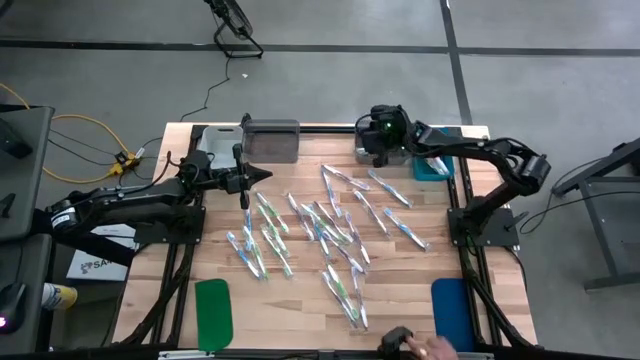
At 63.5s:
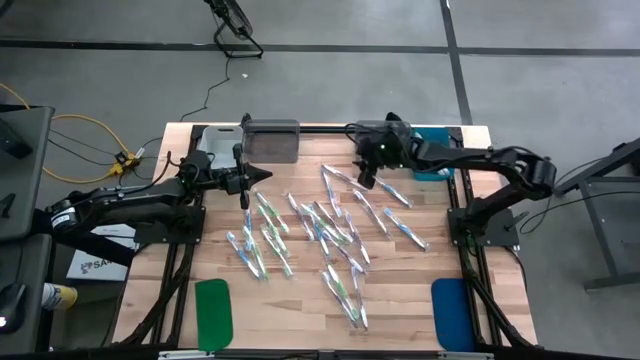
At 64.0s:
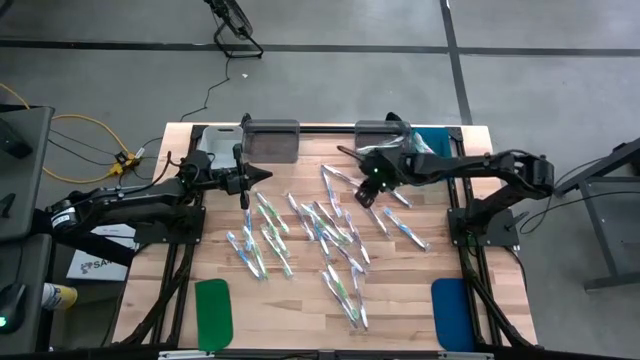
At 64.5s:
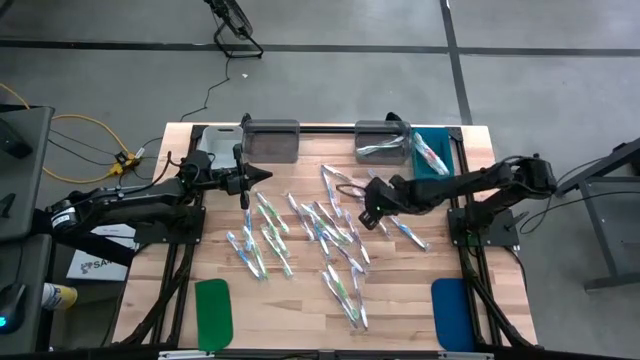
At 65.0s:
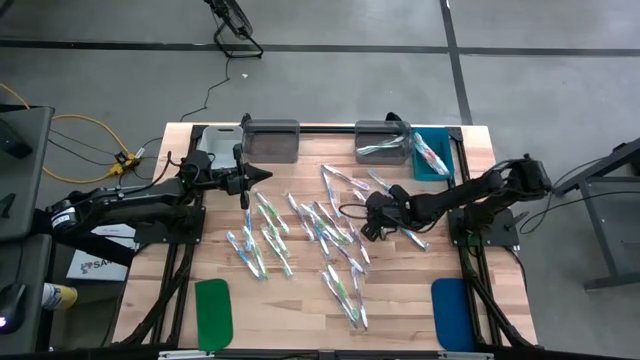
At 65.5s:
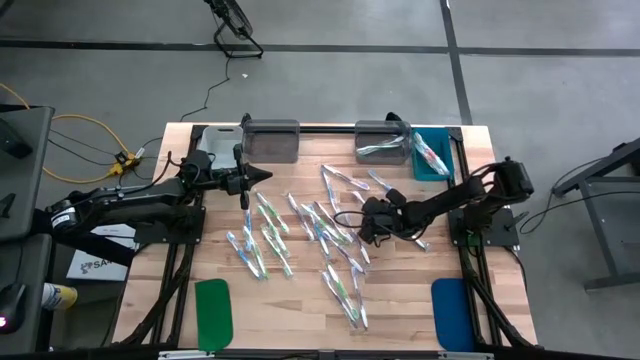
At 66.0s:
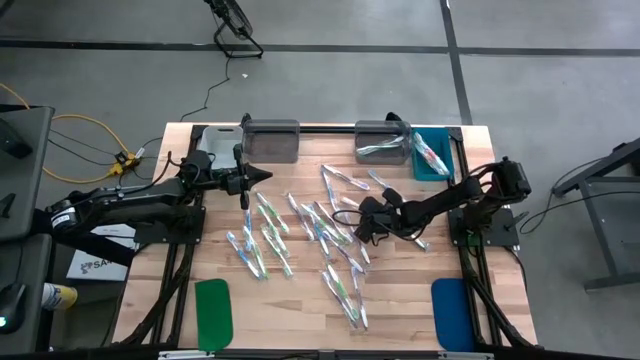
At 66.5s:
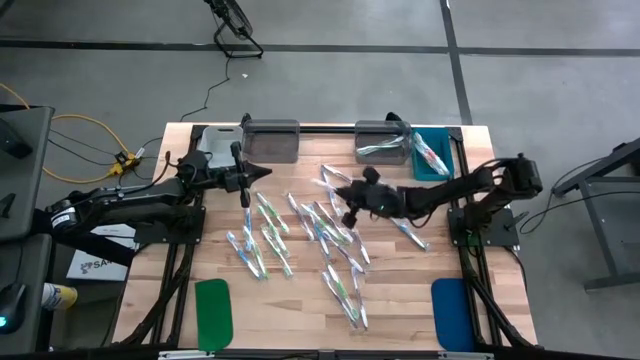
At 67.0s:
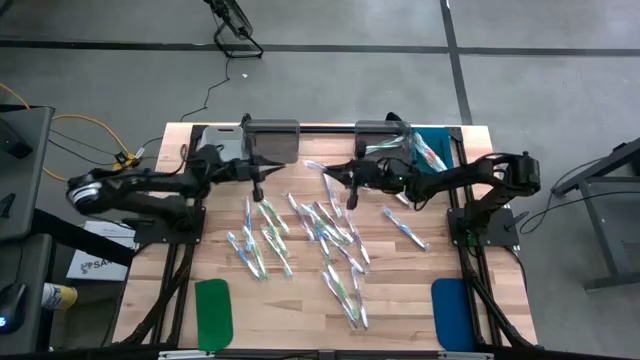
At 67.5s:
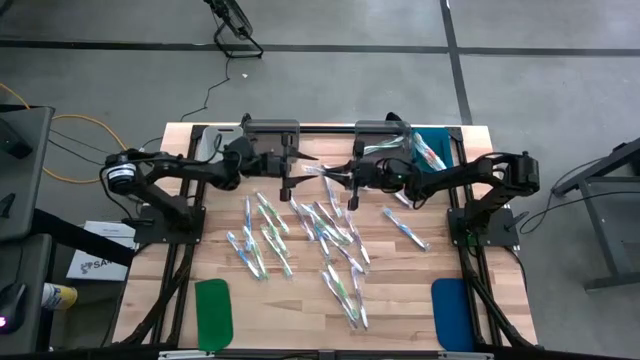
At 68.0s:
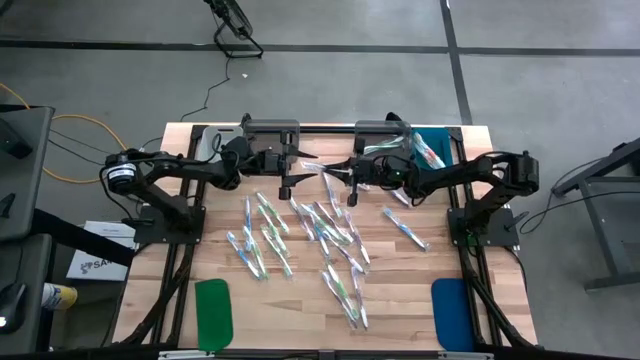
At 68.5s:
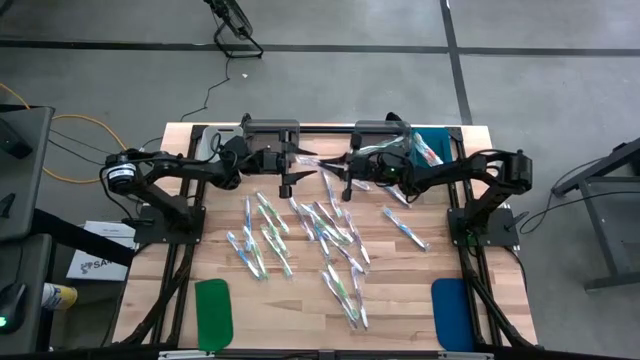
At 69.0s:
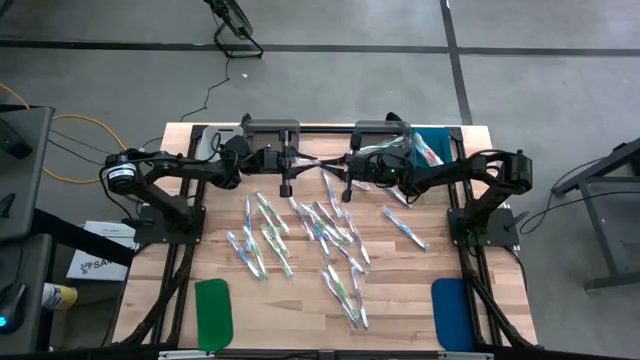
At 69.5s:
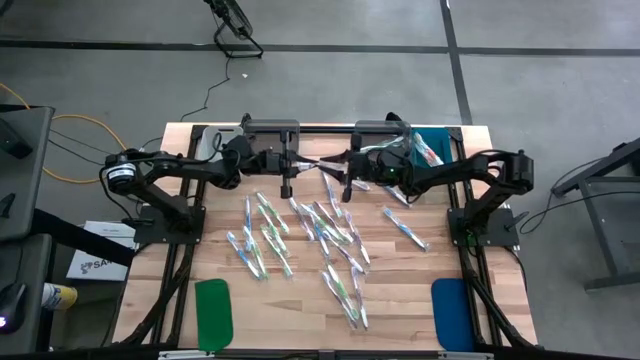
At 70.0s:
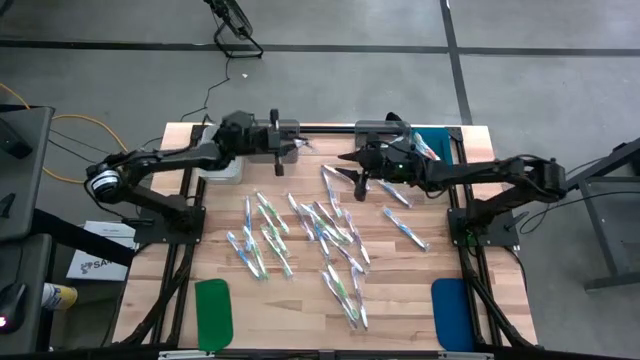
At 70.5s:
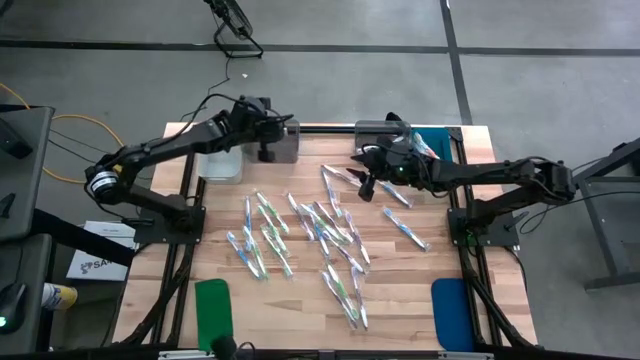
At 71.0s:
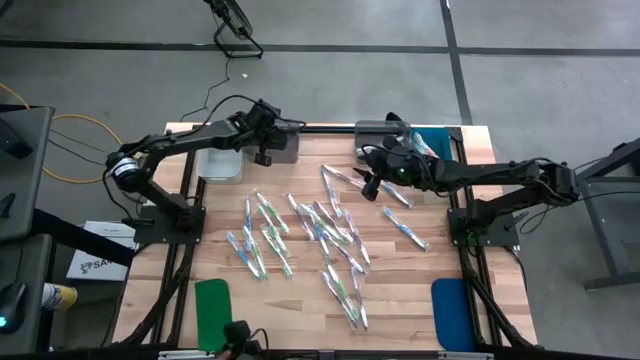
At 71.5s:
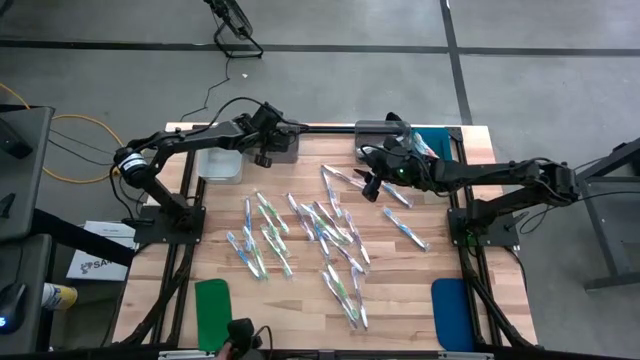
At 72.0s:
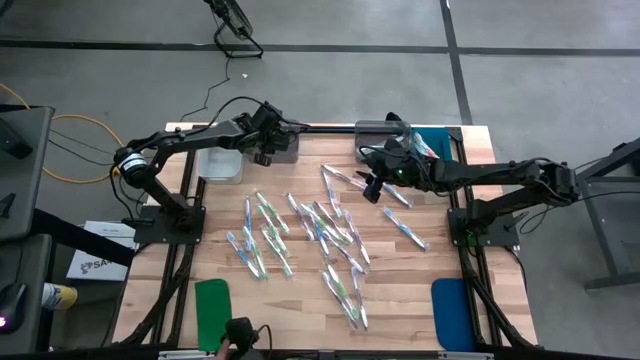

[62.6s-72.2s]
Task: Pick & Place Toothbrushes
Put the violet toothbrush into the left black bin

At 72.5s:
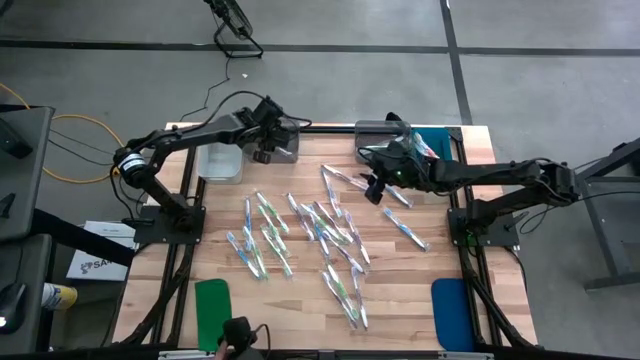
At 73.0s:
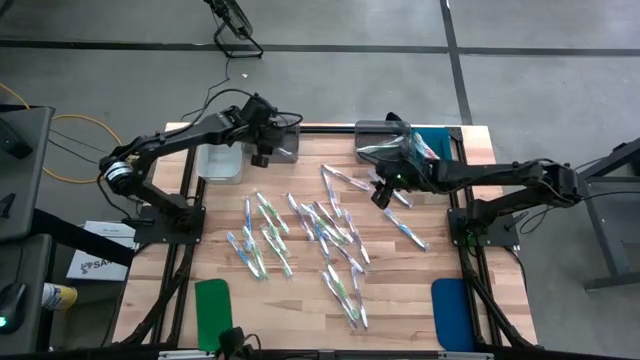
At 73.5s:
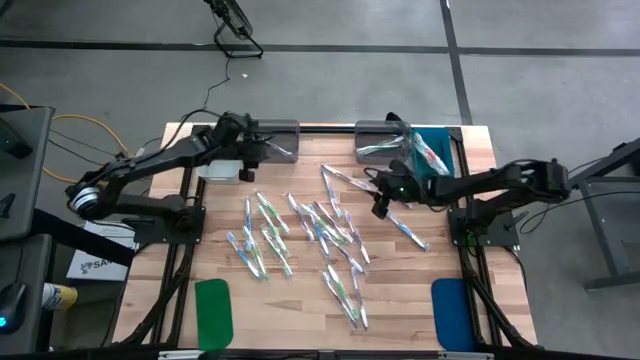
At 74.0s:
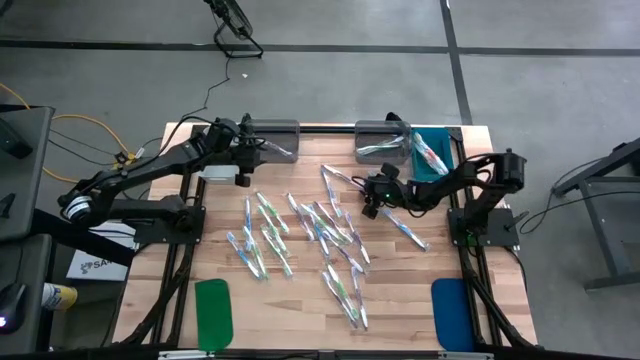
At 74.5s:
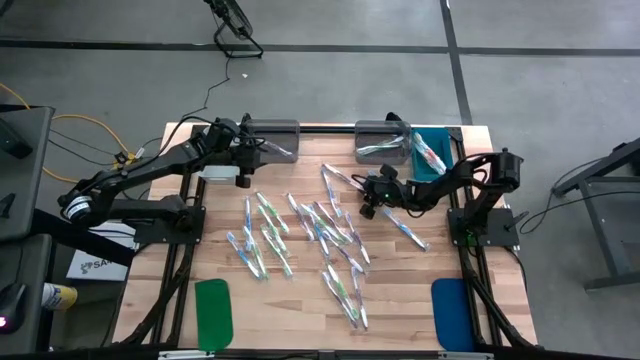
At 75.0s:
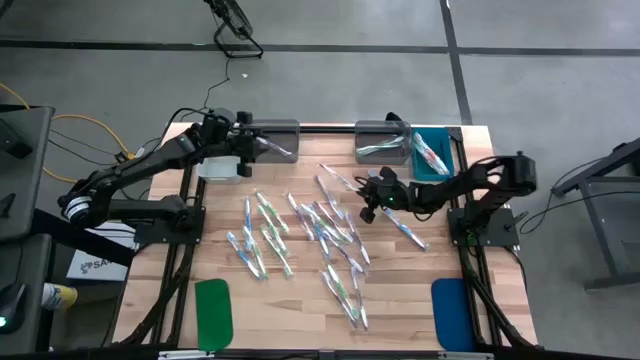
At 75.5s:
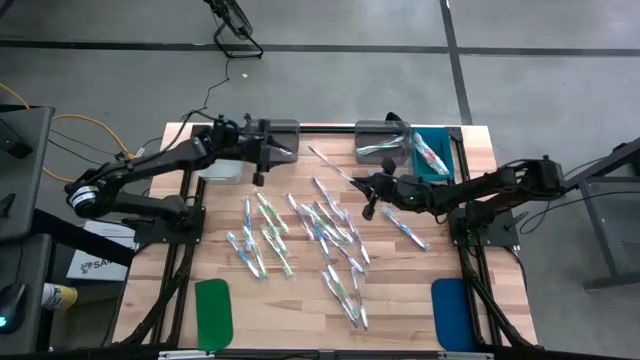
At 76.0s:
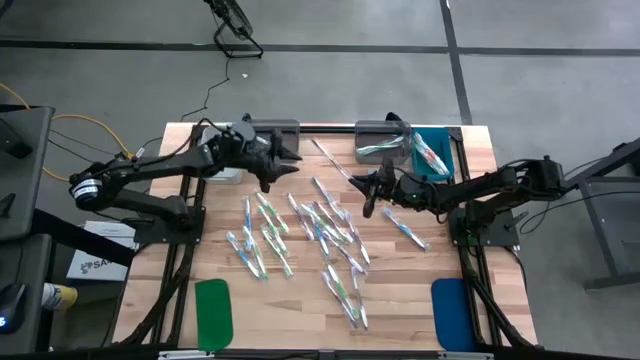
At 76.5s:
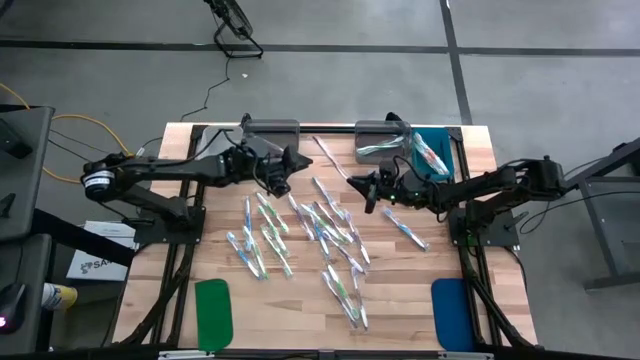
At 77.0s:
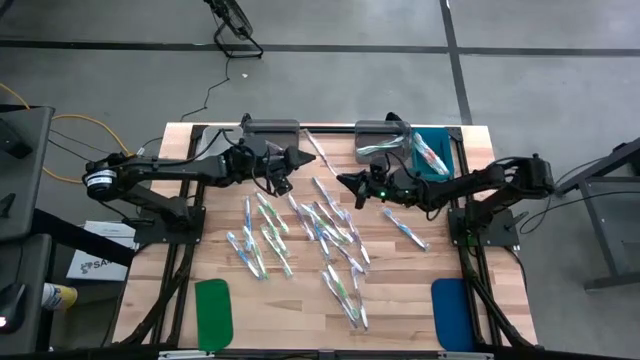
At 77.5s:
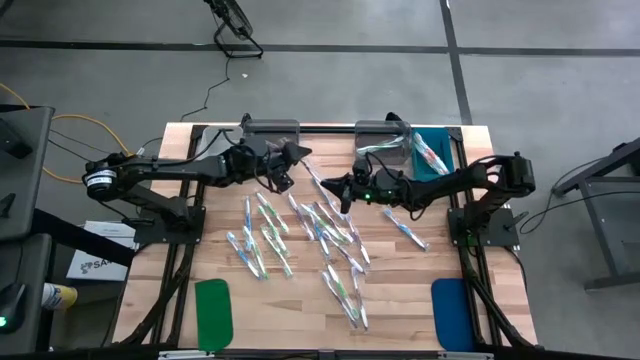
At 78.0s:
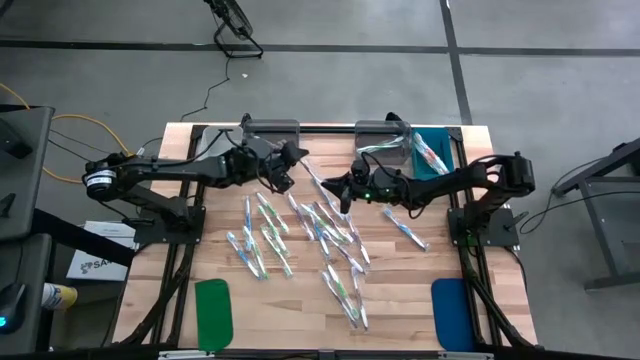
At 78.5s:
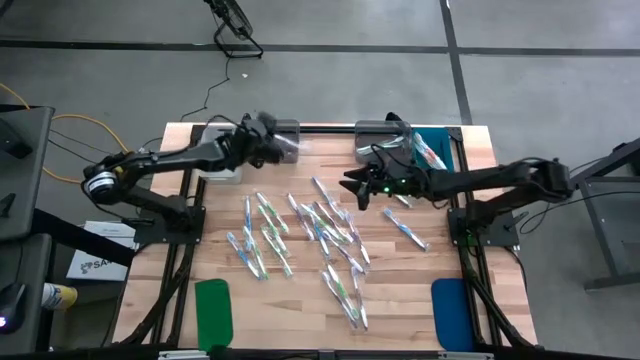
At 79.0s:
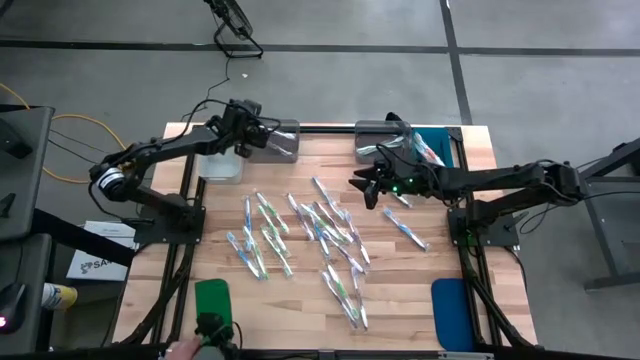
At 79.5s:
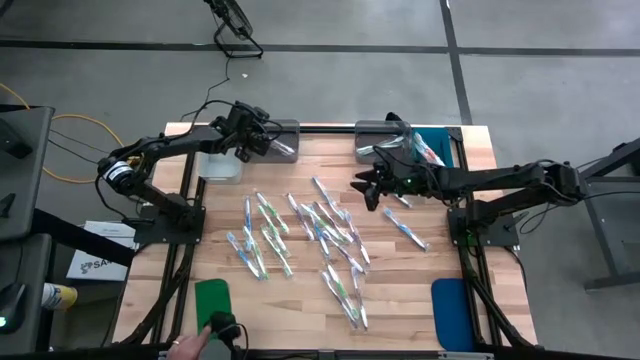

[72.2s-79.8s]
Put the violet toothbrush into the left black bin

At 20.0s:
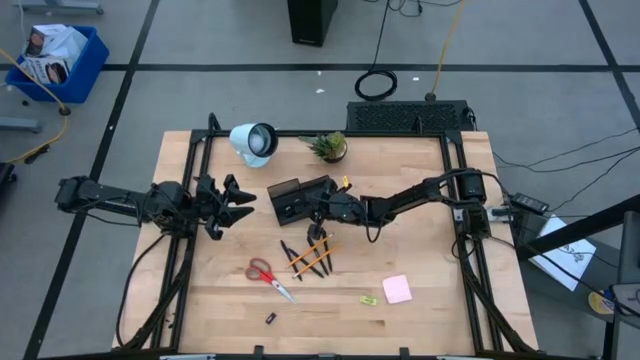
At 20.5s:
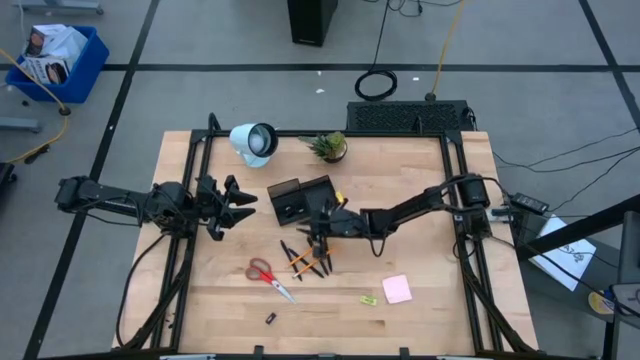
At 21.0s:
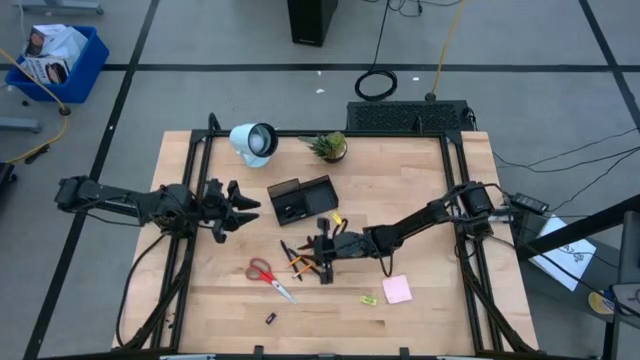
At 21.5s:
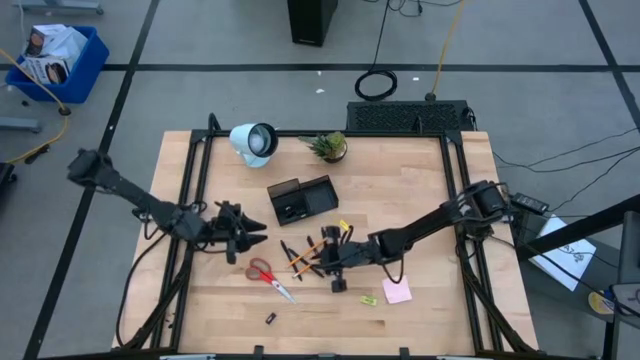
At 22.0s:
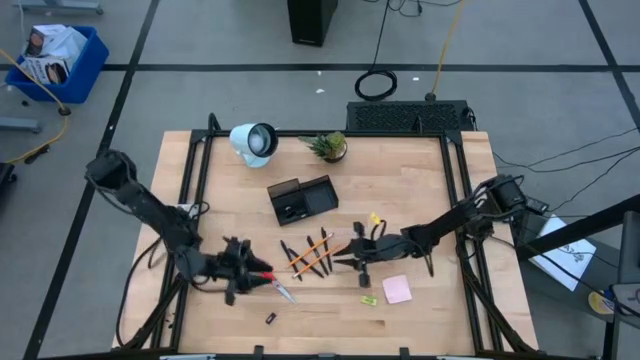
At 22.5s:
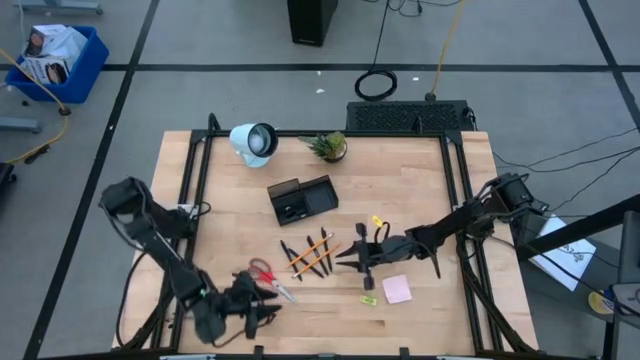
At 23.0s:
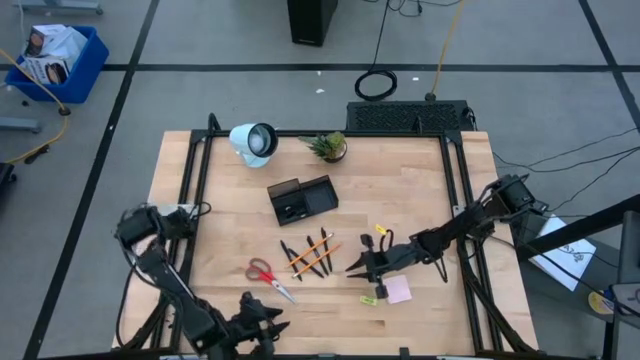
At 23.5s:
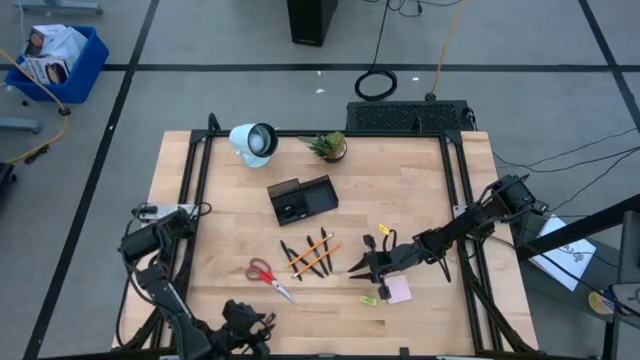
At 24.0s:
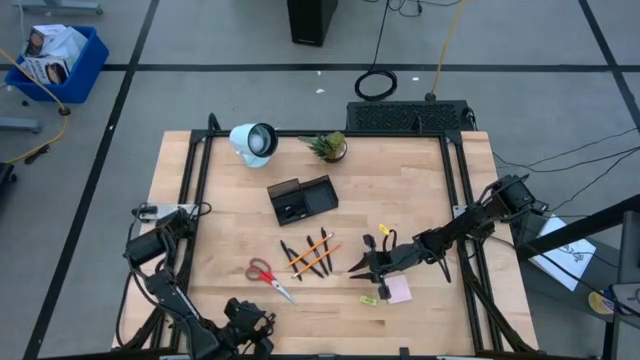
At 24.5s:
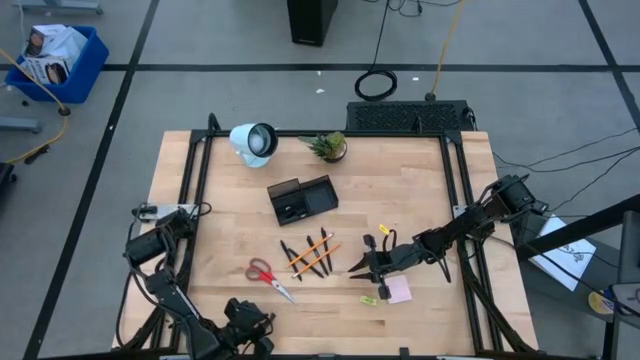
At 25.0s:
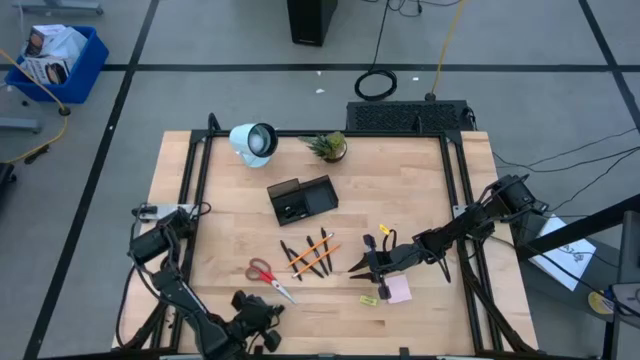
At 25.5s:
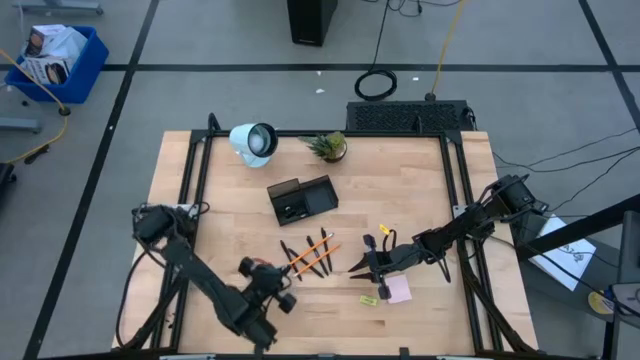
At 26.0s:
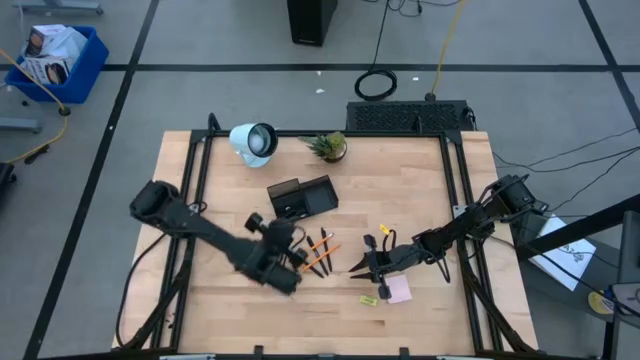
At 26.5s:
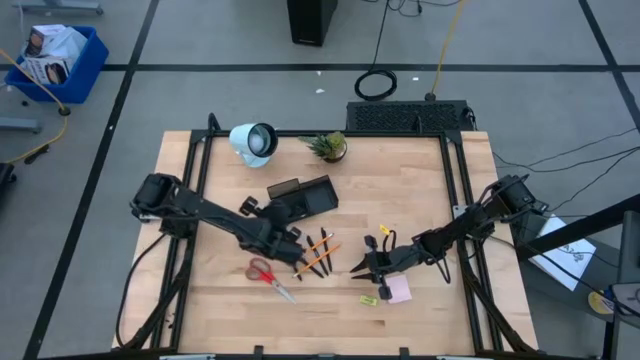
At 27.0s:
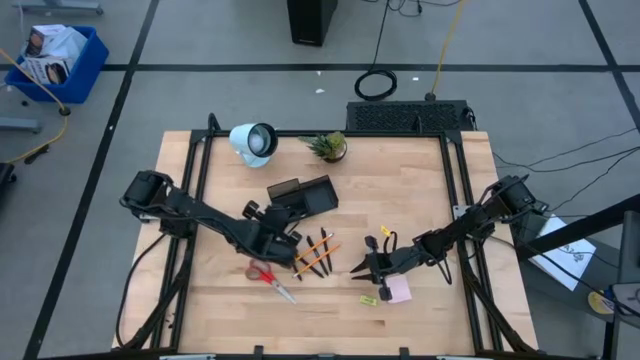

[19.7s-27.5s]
Task: Pick and place office supplies into organizer
Put the black binder clip into the black desk organizer
